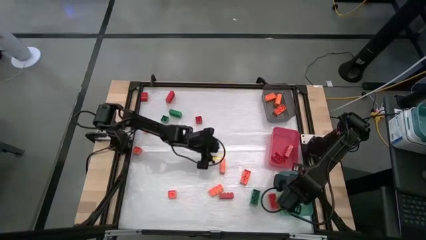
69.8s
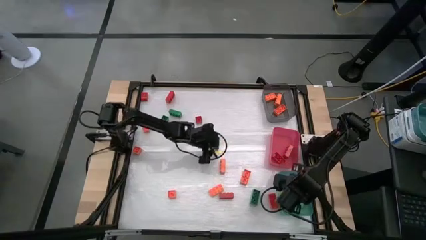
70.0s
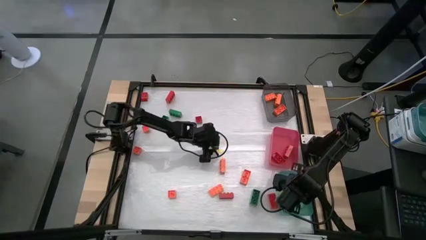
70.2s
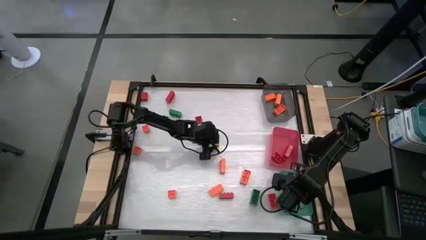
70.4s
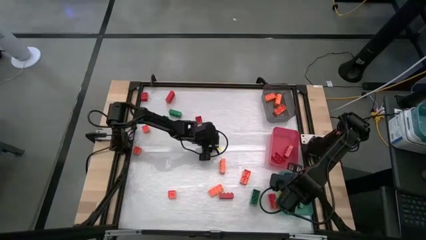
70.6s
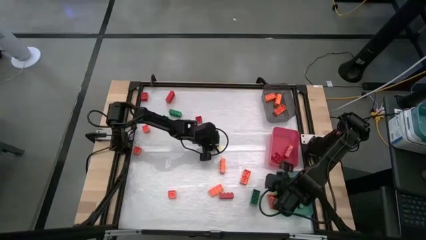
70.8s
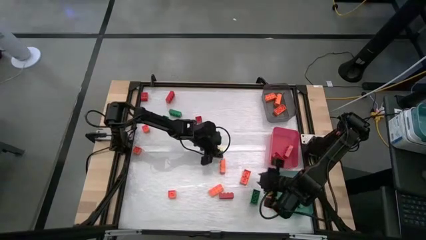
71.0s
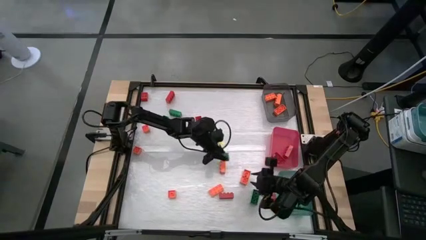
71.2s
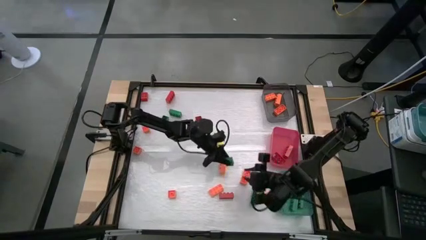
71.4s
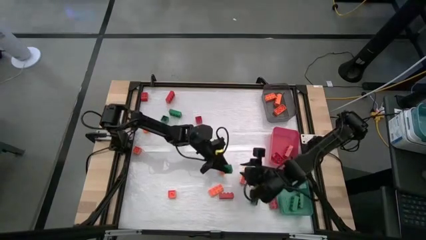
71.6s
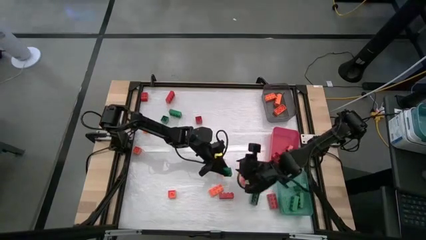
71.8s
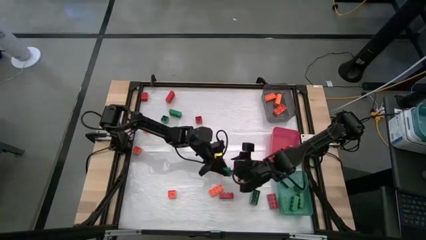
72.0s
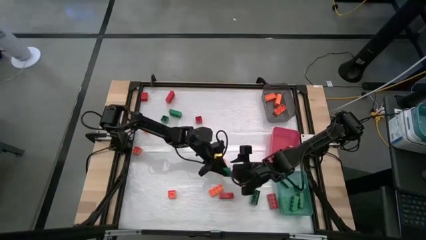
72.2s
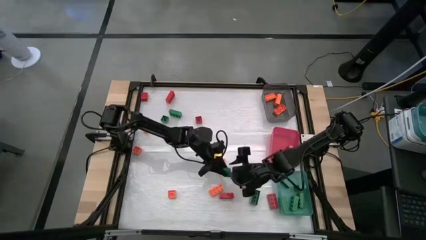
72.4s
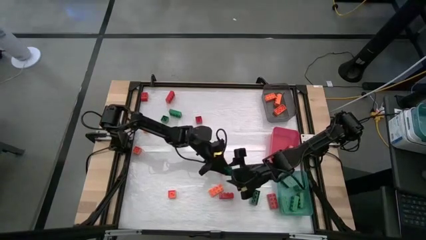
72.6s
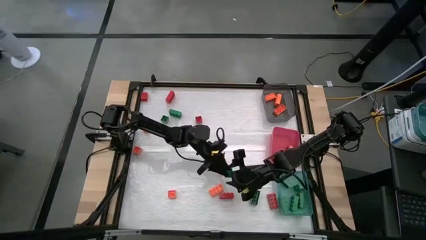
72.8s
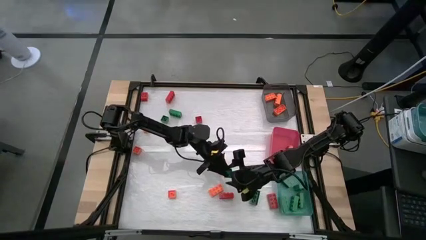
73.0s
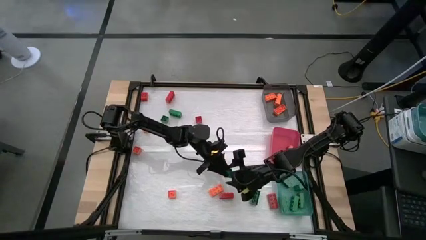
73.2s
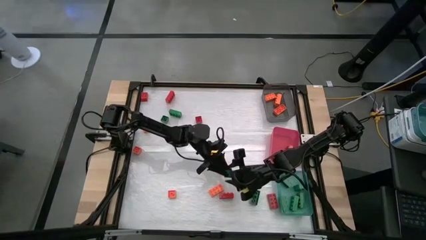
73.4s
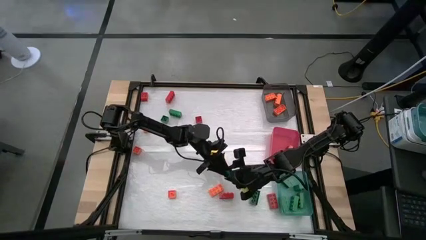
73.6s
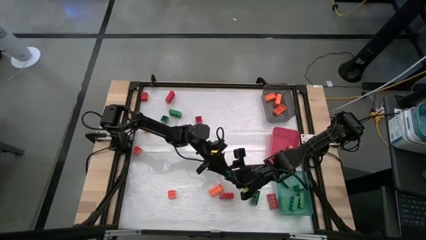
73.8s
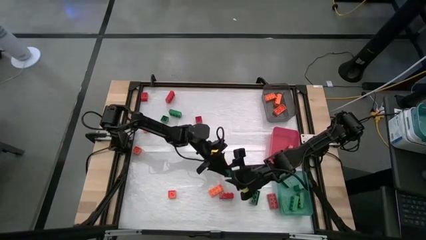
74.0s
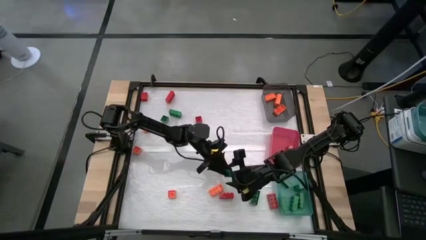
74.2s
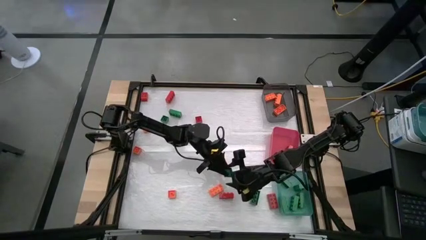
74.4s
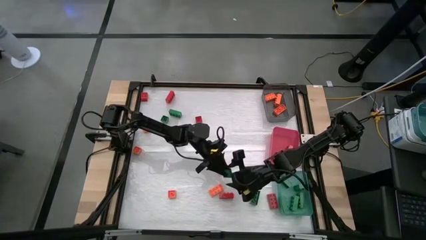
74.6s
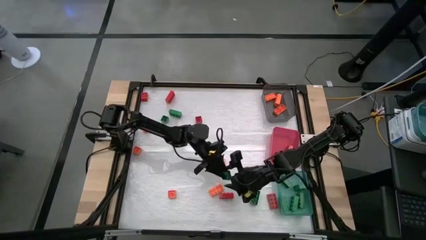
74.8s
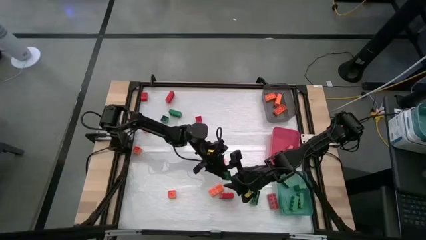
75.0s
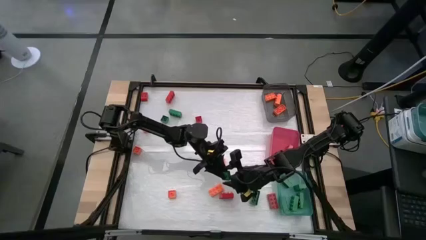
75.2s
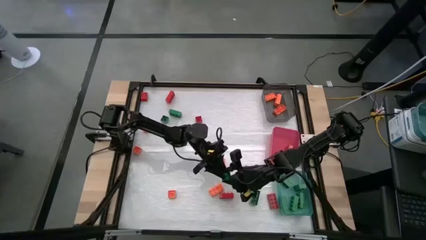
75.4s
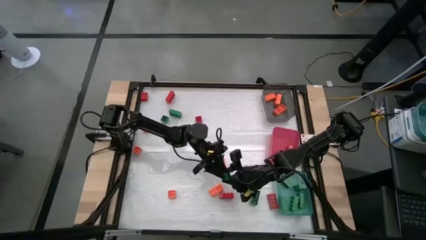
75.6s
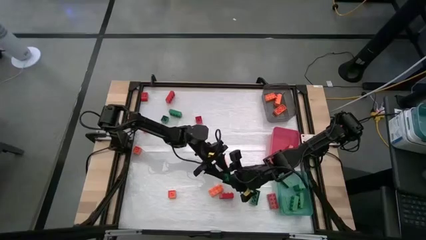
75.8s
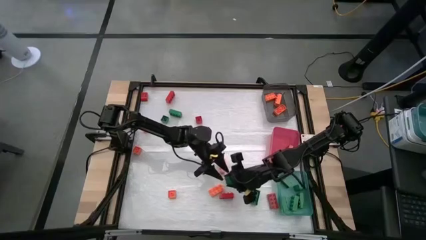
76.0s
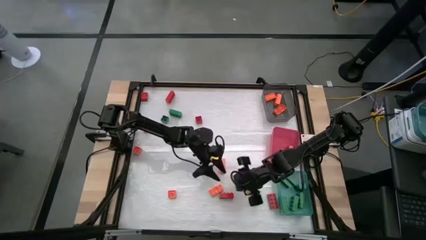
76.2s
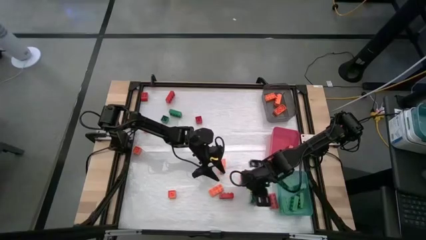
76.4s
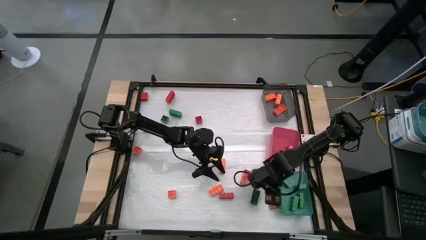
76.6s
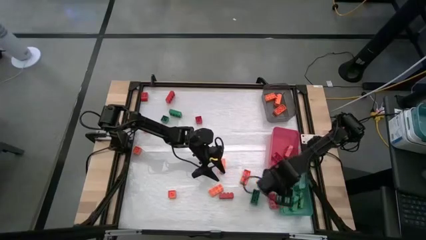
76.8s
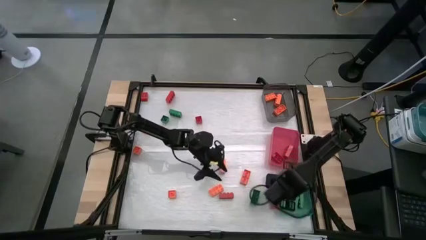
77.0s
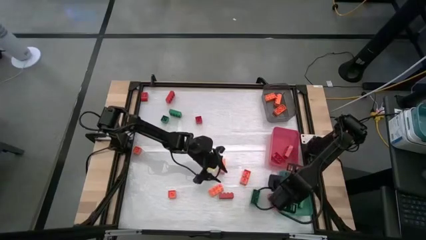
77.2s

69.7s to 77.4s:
Task: Sort blocks
Put the green game piece into the blue bin

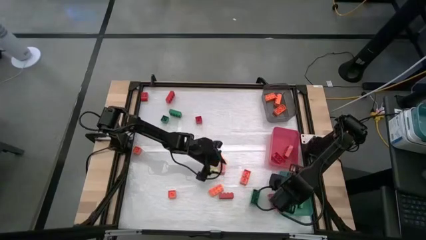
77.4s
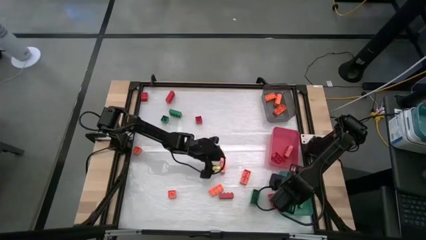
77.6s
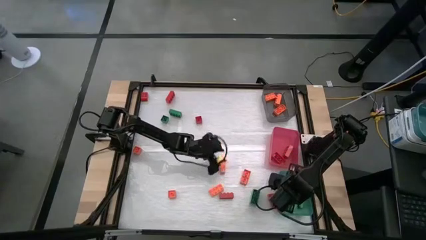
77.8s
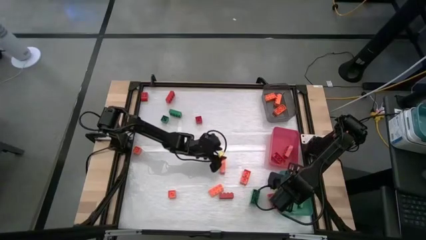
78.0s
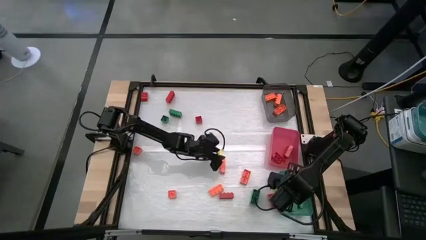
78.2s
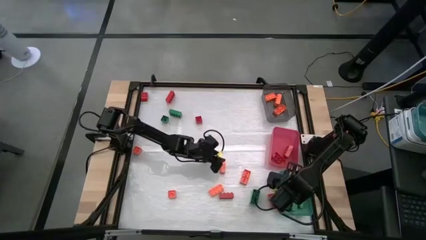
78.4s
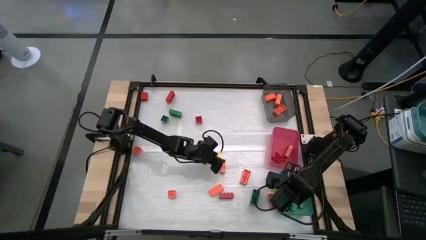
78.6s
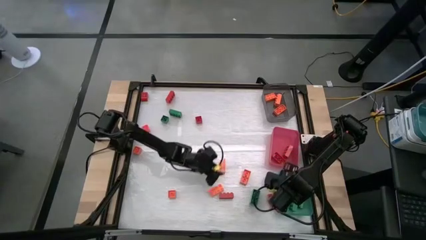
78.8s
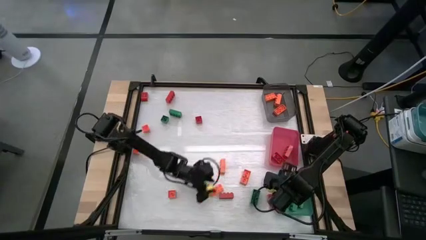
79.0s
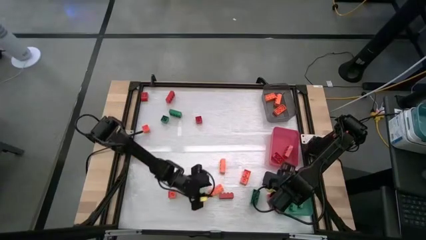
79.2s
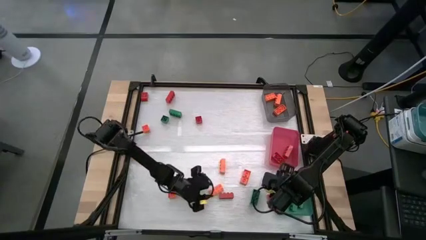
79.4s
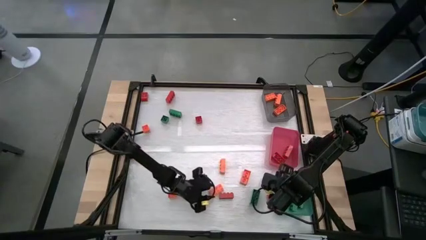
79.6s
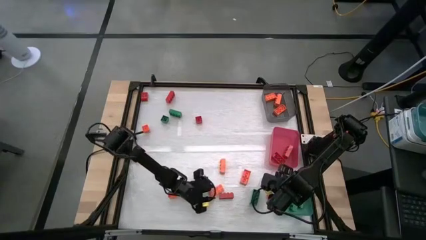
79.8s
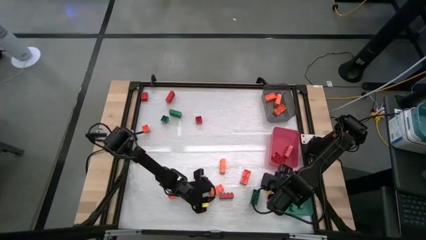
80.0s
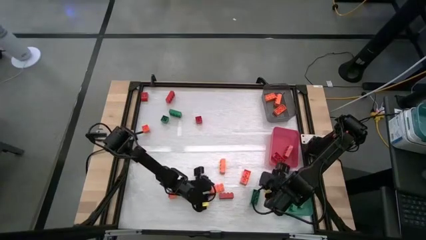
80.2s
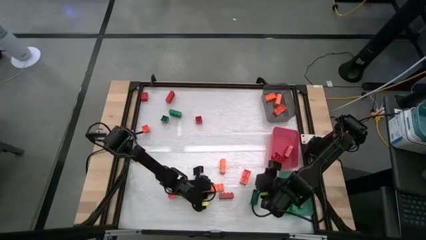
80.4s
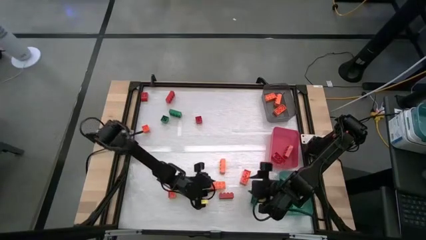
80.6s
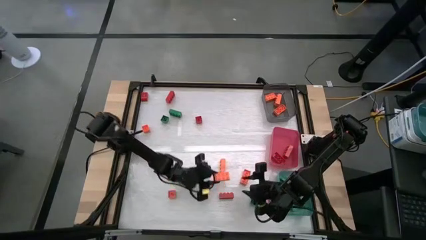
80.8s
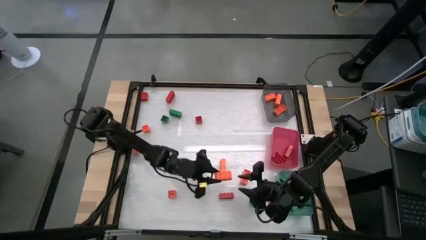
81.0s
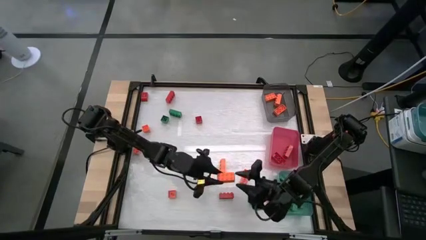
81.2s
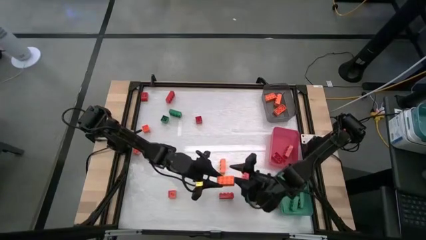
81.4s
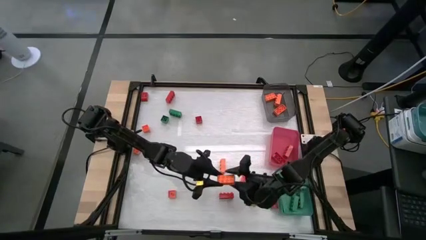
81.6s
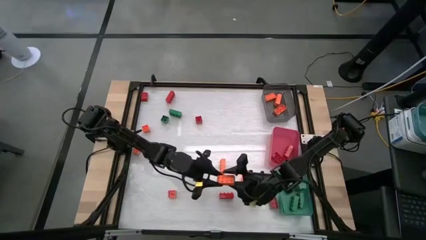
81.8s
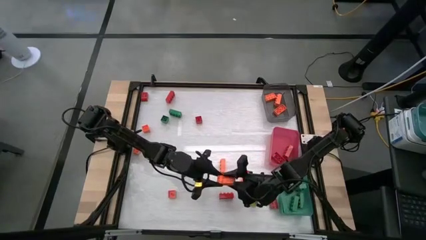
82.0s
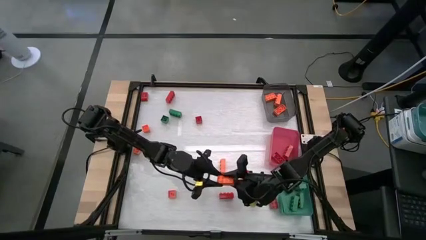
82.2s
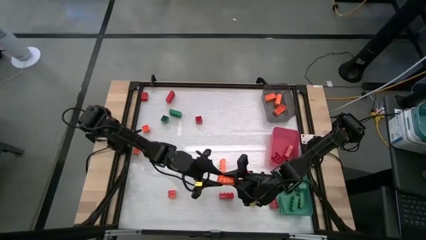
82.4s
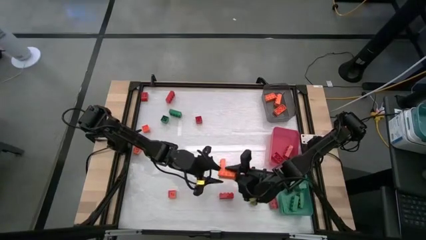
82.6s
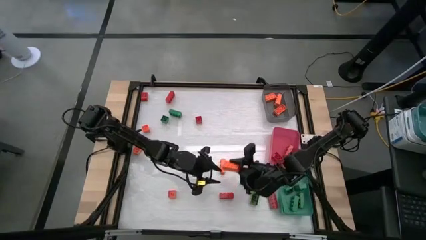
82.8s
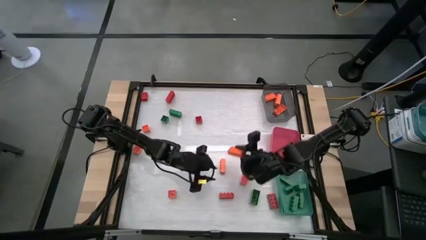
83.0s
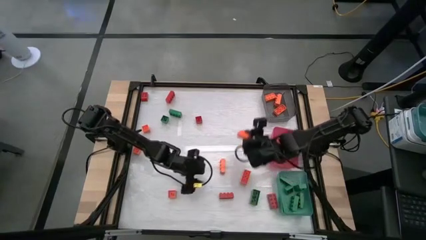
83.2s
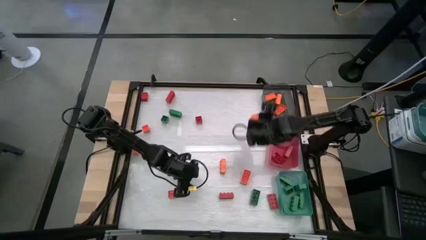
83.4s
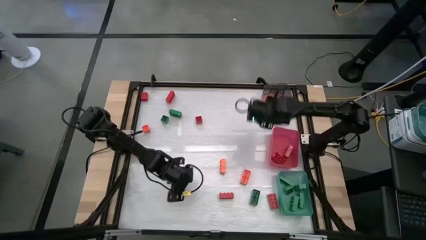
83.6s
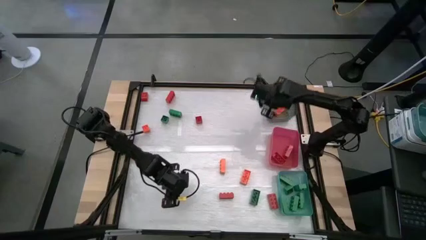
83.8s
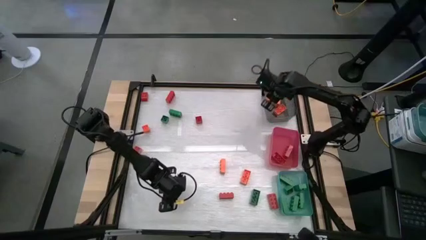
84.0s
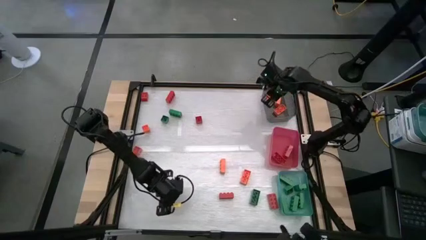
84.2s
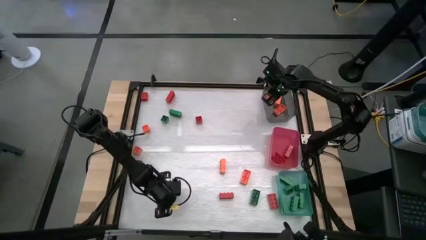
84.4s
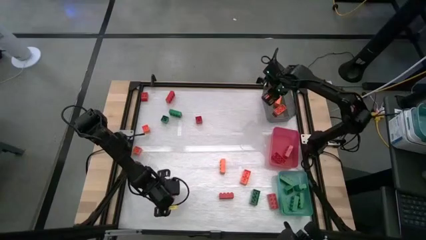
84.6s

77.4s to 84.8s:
Put the orange game piece into the black bin

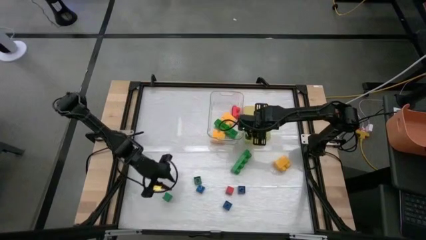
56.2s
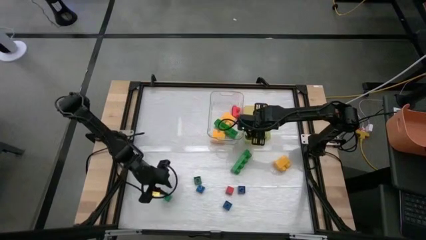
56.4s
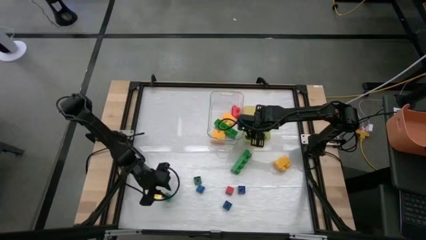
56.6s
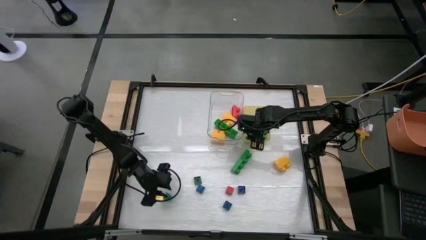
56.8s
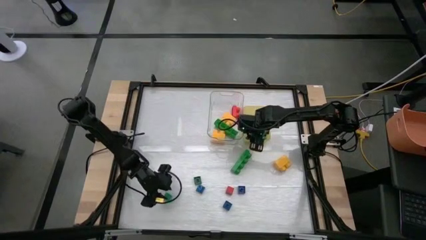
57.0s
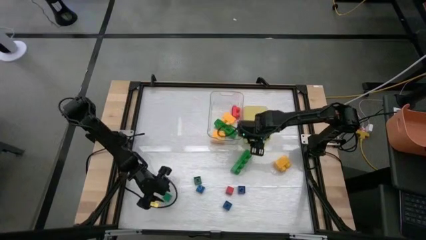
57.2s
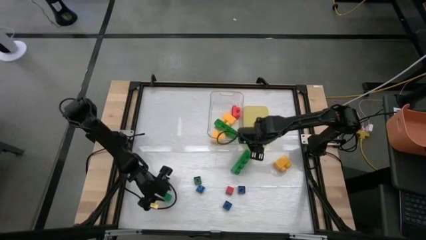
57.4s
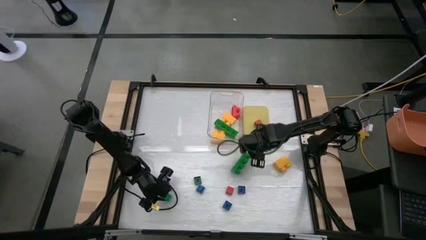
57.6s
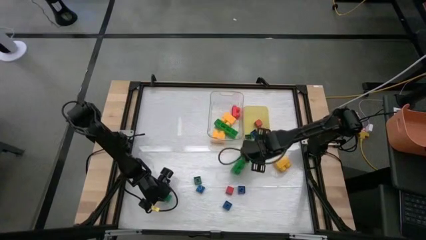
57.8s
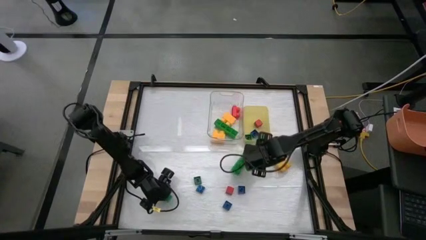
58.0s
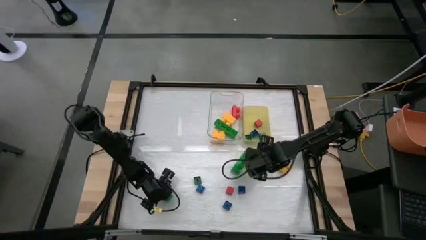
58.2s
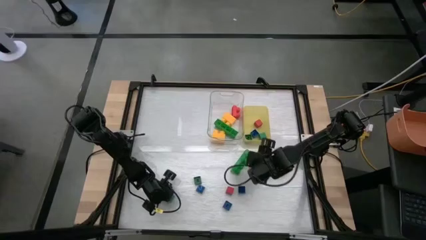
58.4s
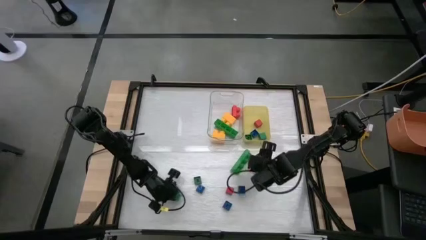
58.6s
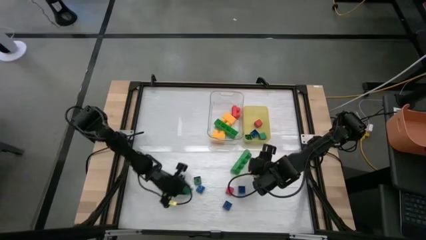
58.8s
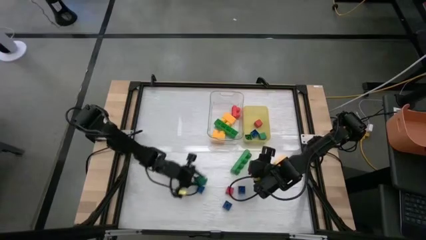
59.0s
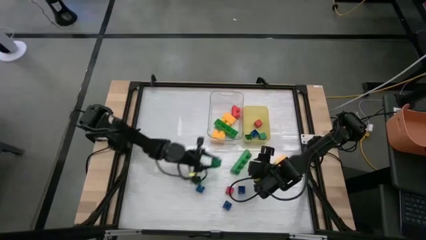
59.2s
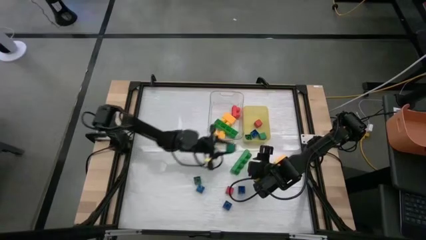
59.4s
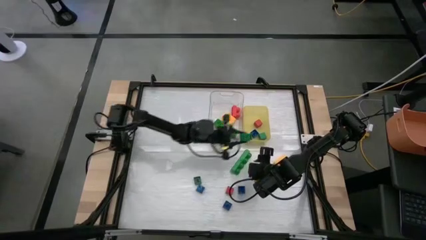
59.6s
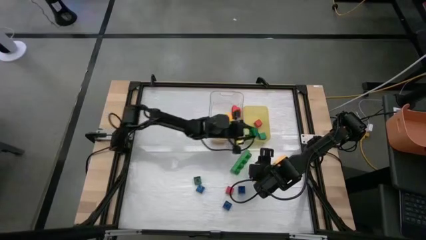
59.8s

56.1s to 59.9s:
Task: Sort blocks by size
Put the small green block into the yellow bin
